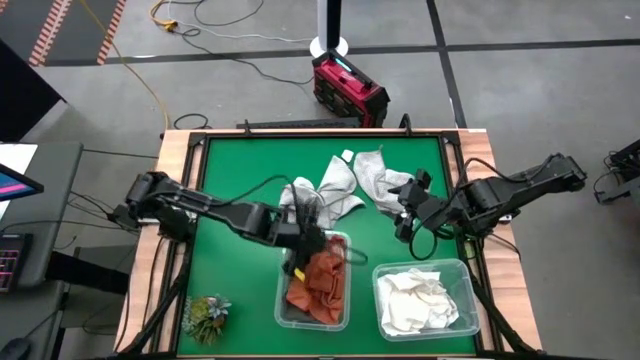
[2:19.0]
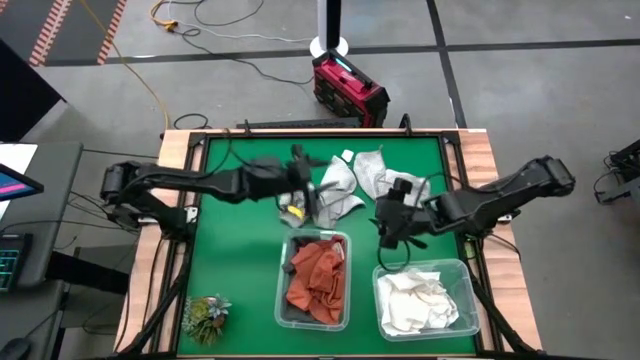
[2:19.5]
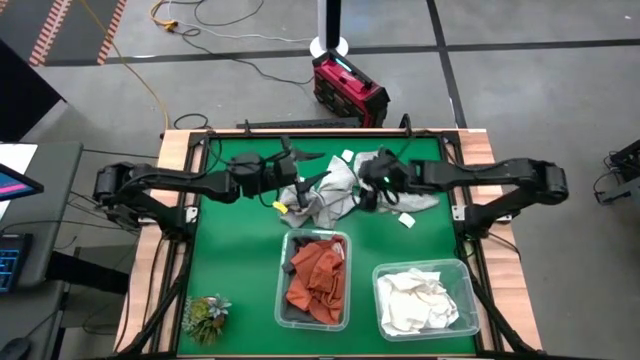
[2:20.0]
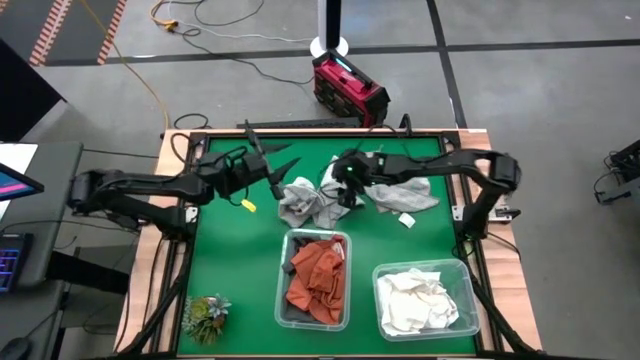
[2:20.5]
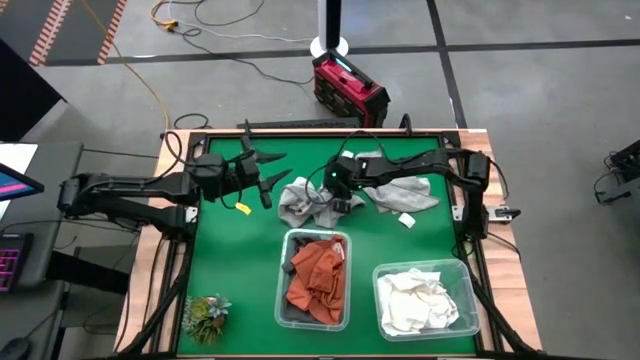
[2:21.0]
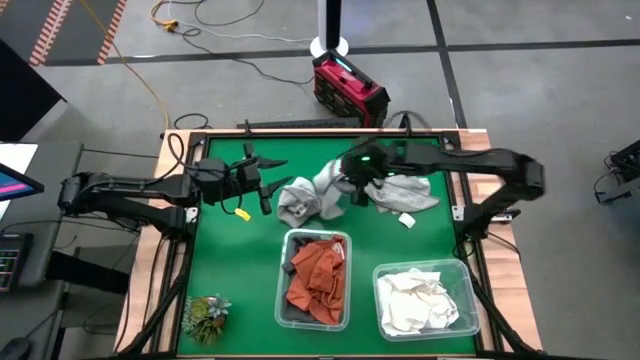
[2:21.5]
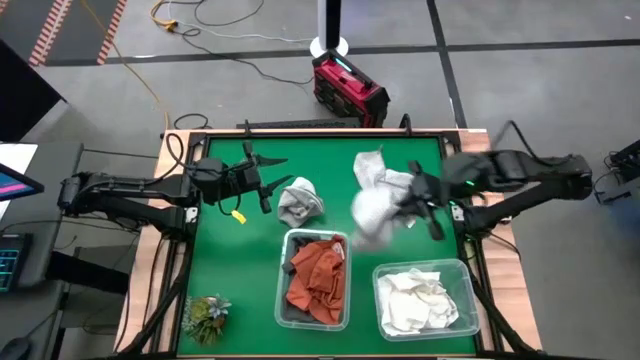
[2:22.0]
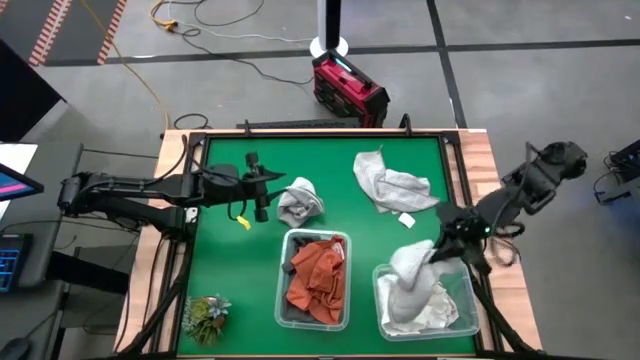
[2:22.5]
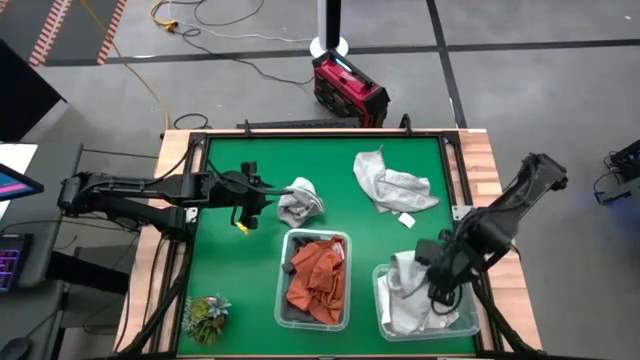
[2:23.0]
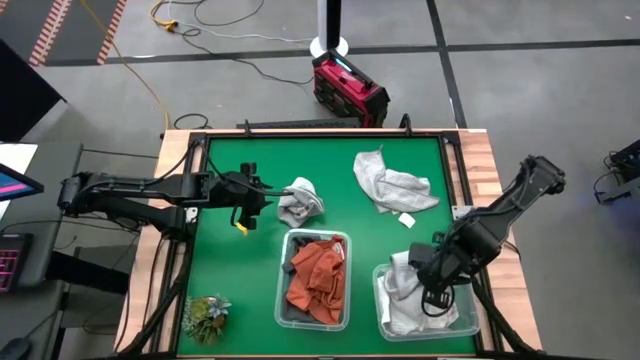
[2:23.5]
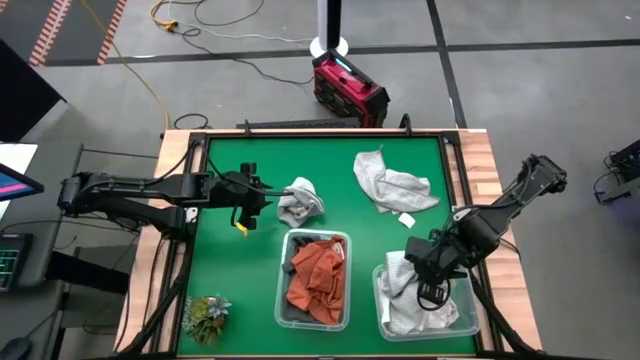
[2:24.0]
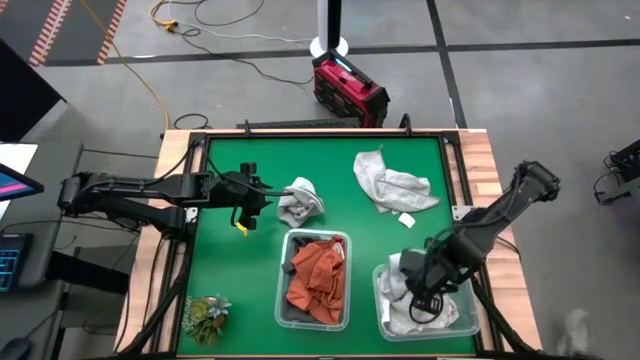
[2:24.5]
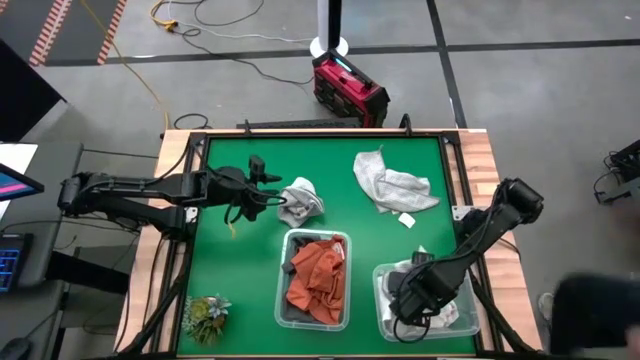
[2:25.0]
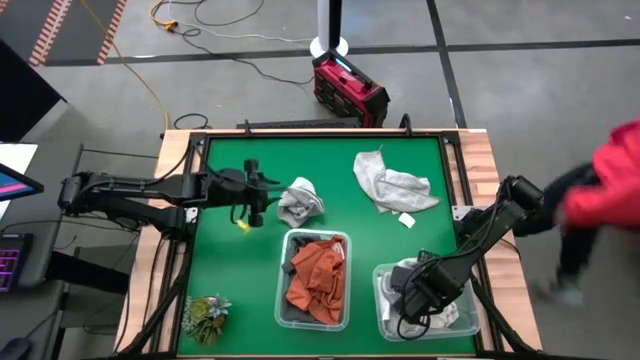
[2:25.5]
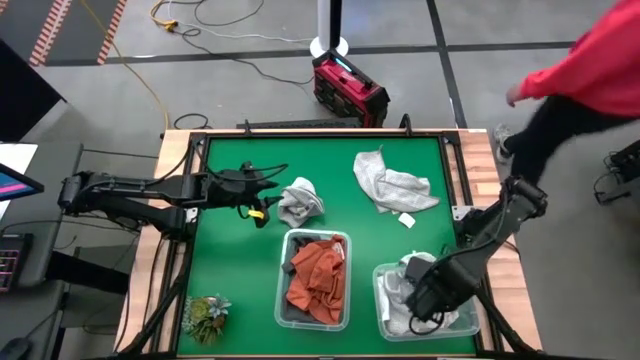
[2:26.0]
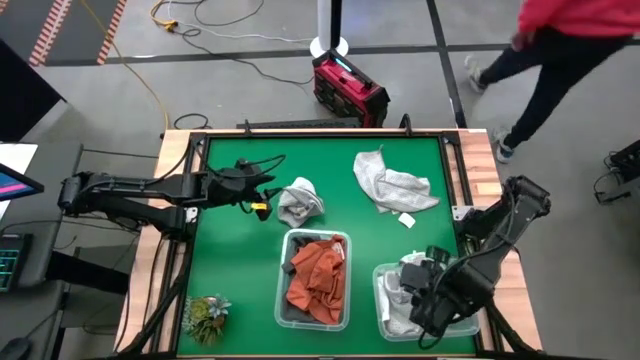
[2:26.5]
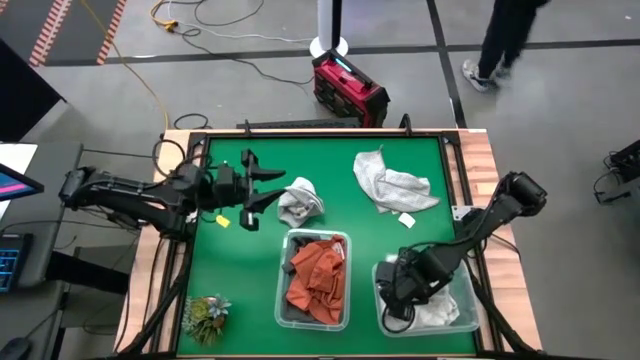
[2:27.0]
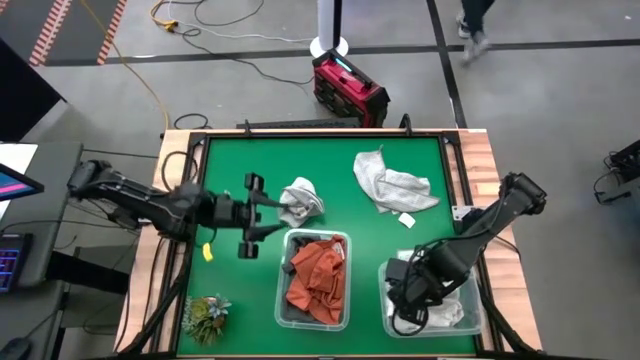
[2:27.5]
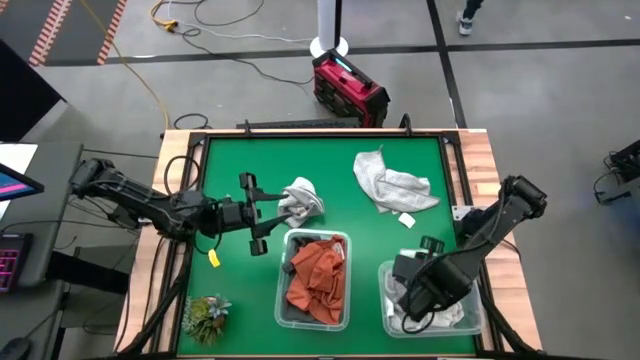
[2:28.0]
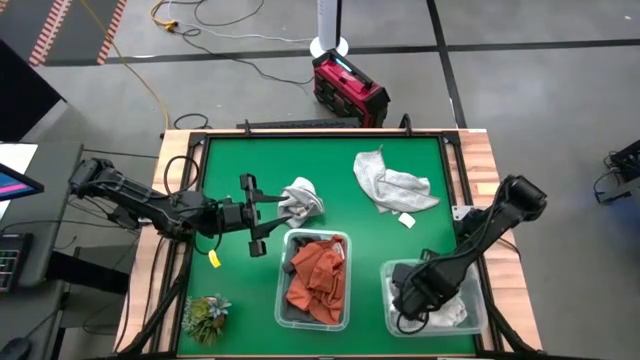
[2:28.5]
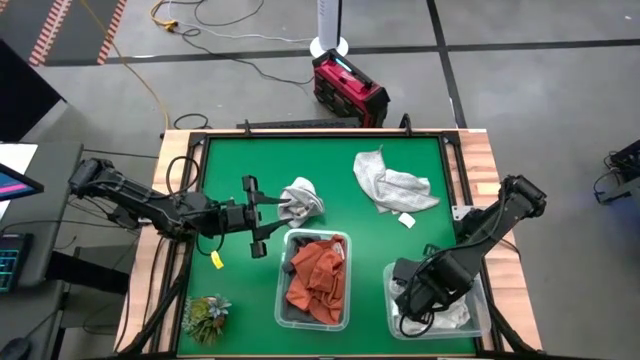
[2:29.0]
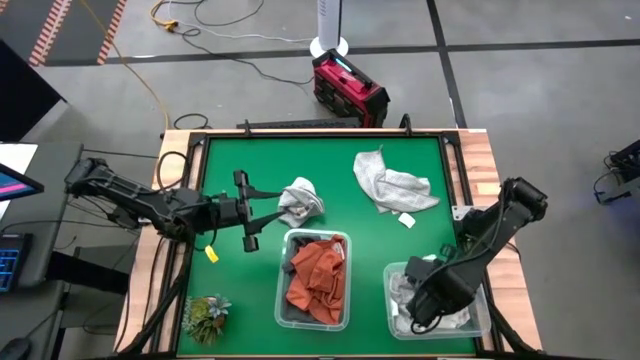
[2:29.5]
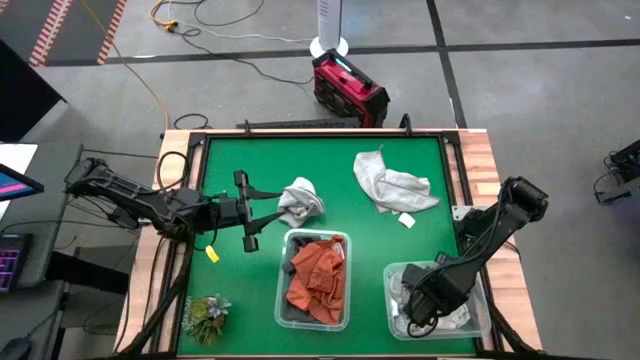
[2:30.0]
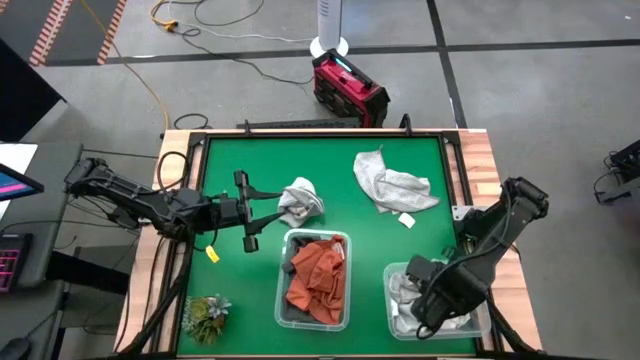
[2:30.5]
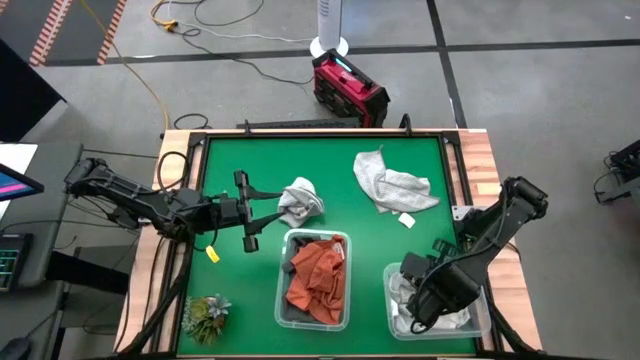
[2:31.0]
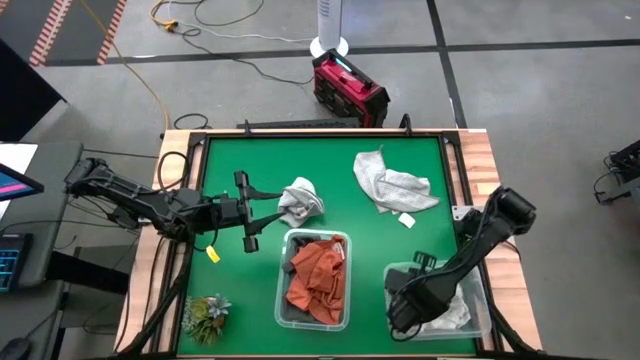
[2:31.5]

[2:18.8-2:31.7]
Task: Sort towels by color in basket
Put the middle light grey towel into the right transparent bin

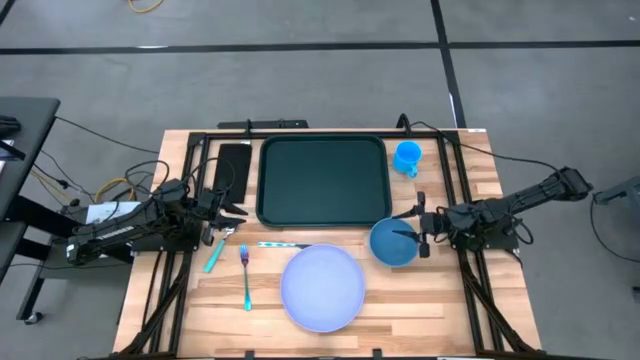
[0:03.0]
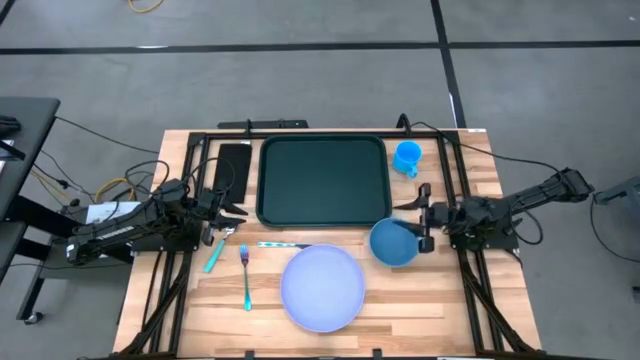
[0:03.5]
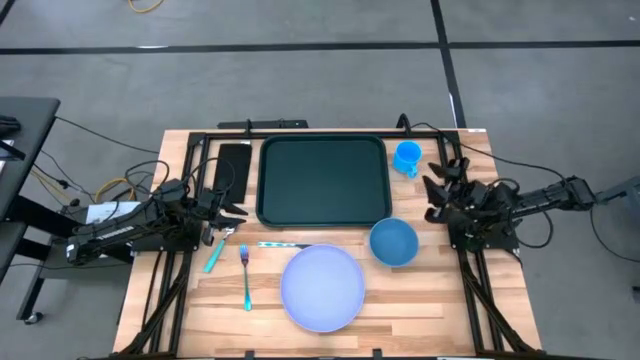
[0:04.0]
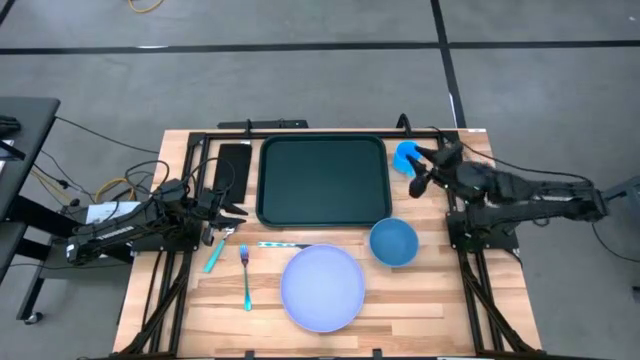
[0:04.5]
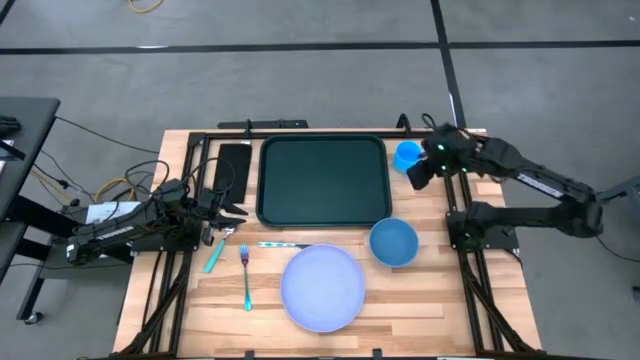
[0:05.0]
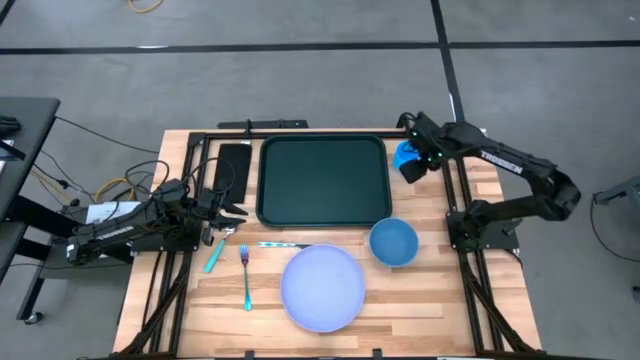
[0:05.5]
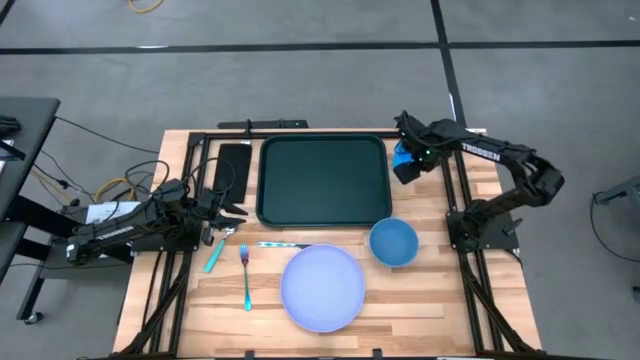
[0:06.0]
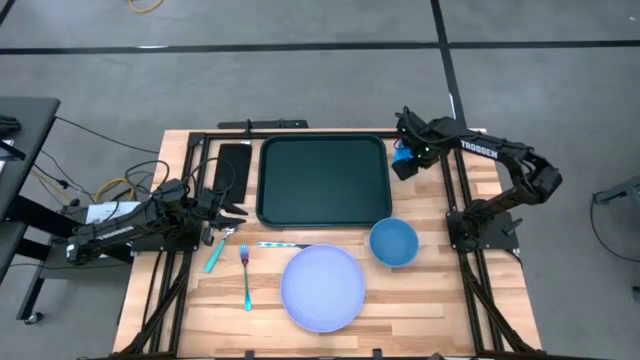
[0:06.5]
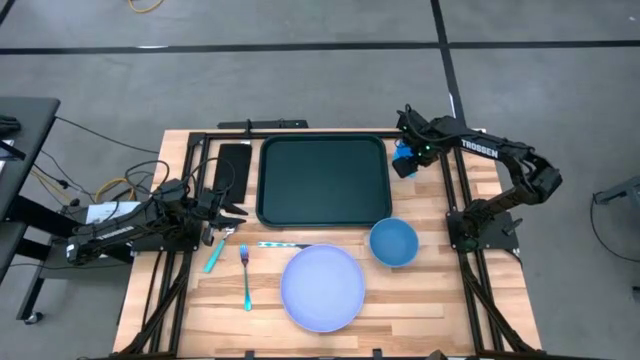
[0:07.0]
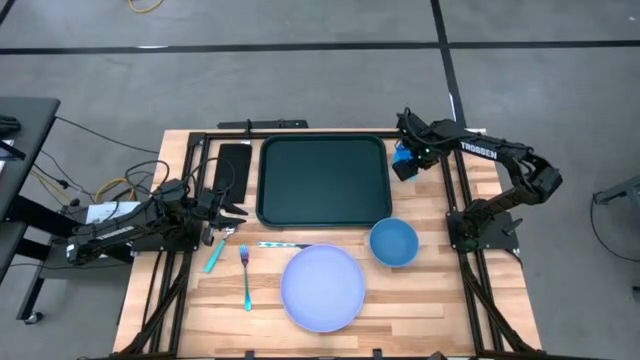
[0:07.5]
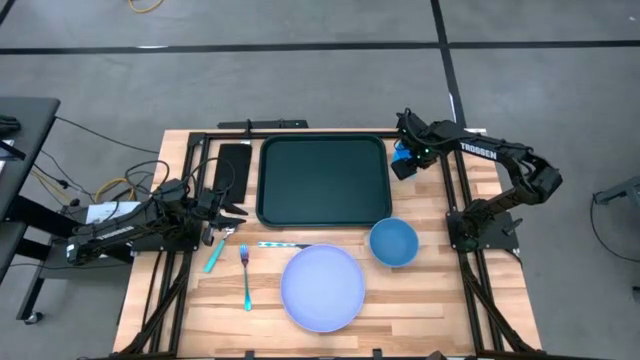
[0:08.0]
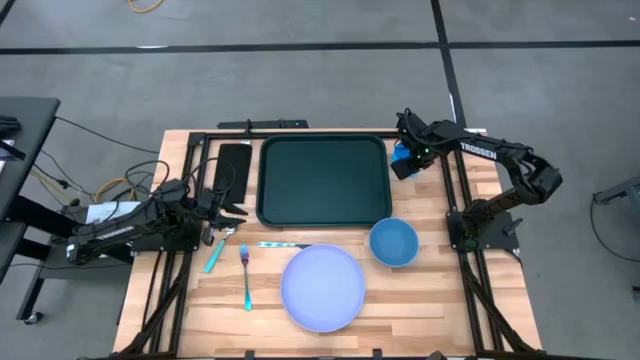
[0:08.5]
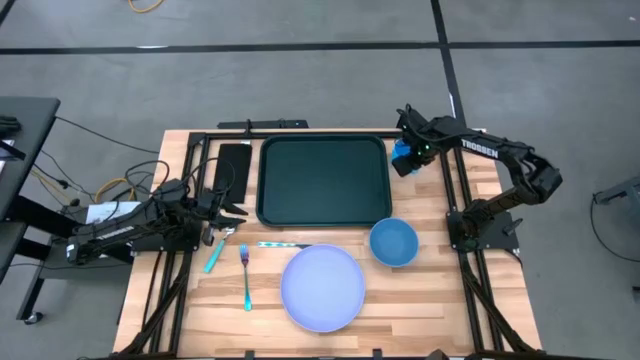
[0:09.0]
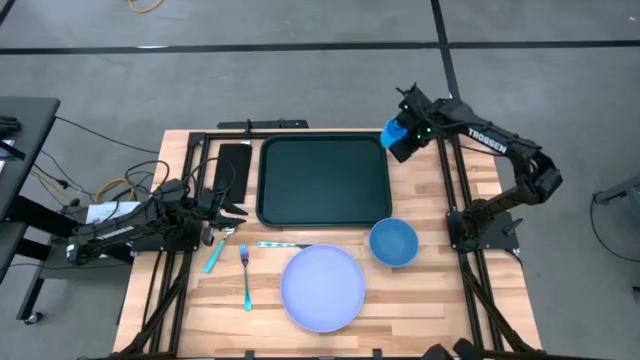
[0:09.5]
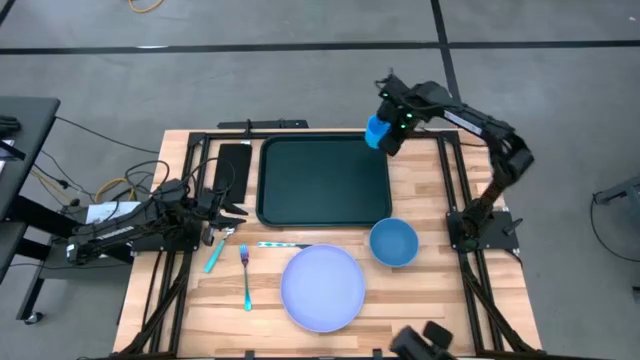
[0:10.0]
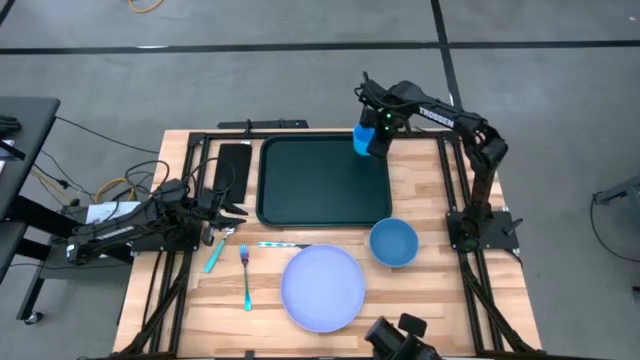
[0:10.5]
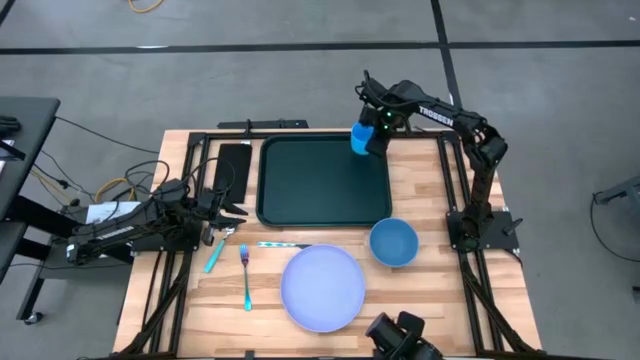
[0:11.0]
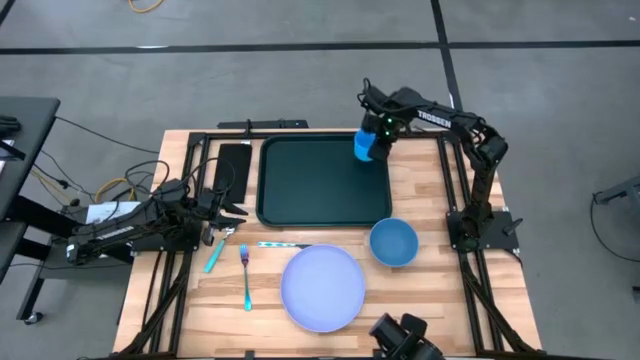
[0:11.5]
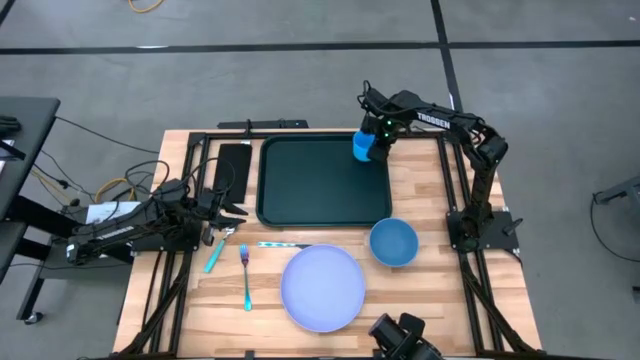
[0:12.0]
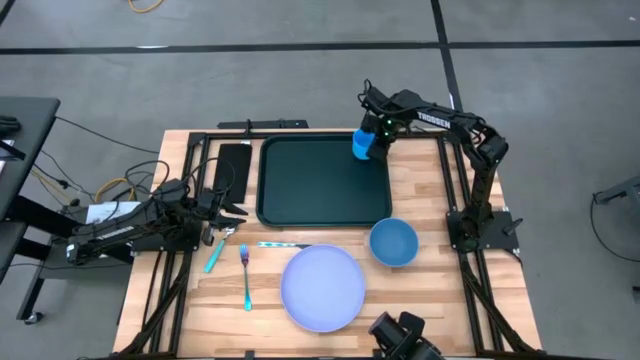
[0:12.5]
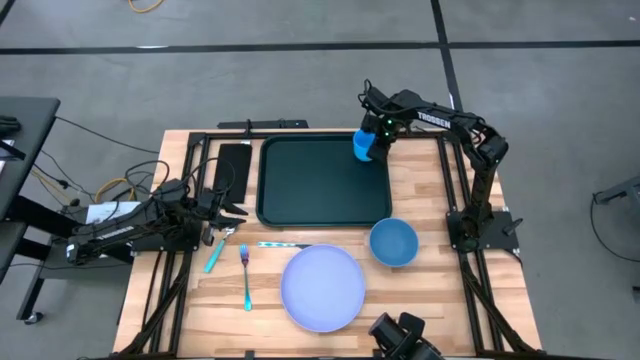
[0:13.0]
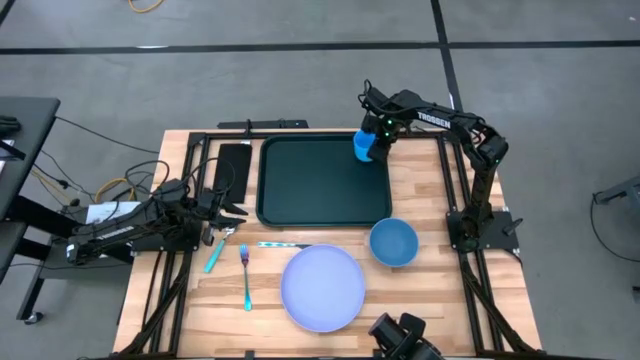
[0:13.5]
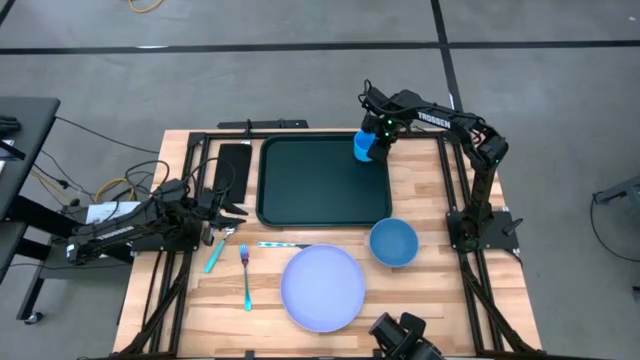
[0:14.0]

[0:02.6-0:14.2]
Task: Set up tray
Put the blue cup on the top left of the black tray
